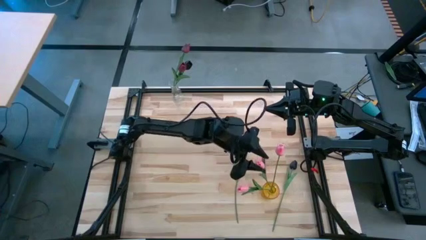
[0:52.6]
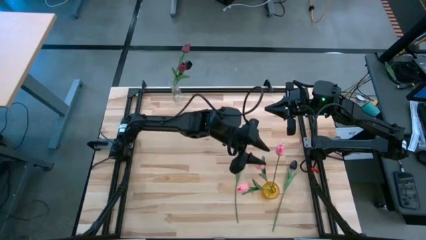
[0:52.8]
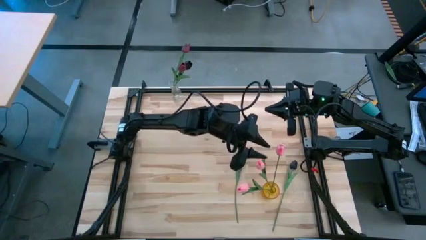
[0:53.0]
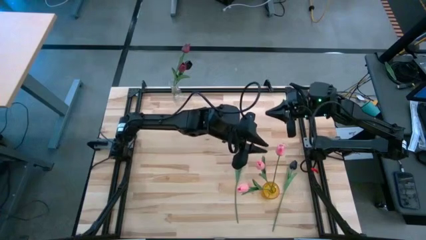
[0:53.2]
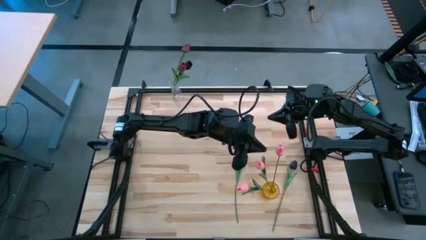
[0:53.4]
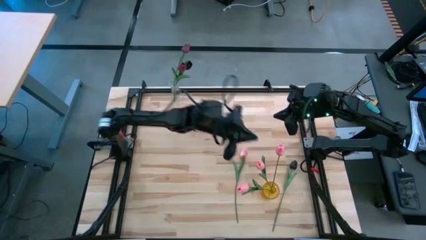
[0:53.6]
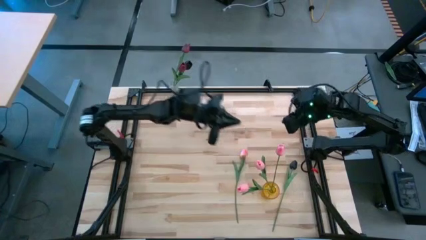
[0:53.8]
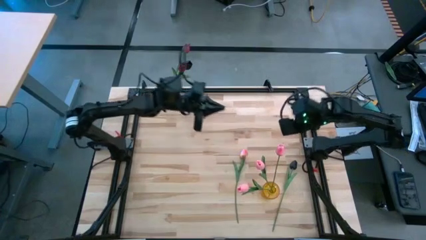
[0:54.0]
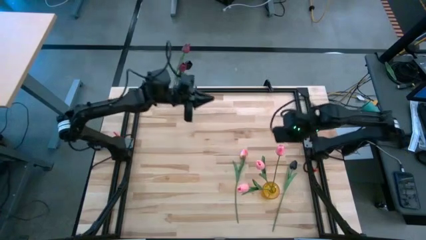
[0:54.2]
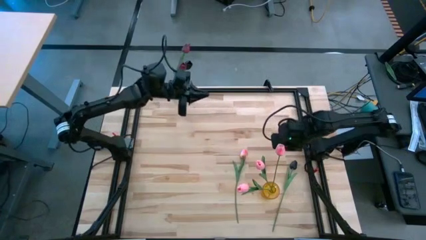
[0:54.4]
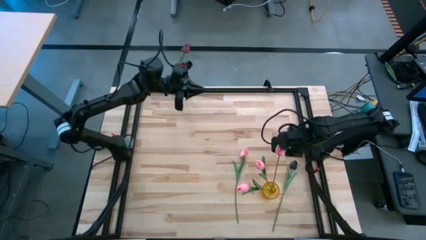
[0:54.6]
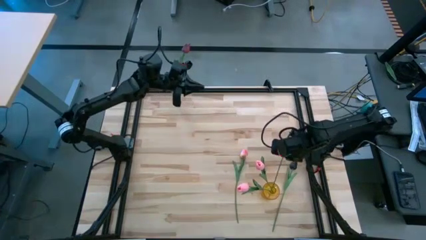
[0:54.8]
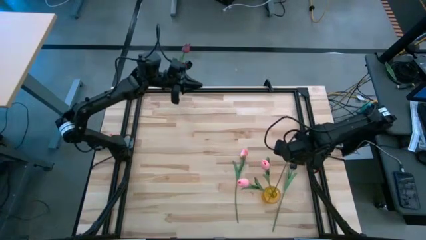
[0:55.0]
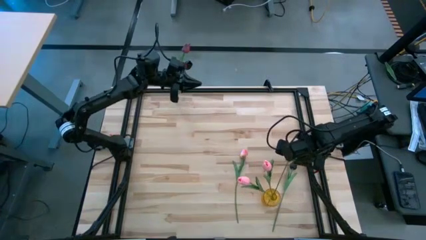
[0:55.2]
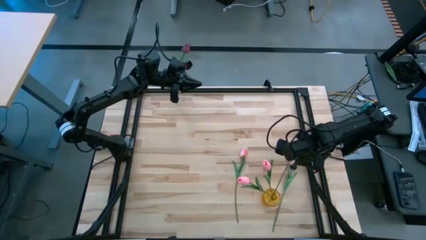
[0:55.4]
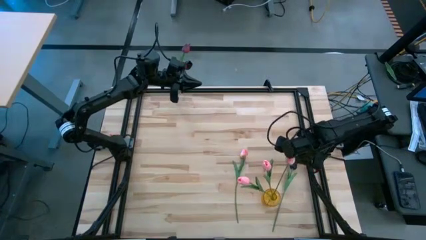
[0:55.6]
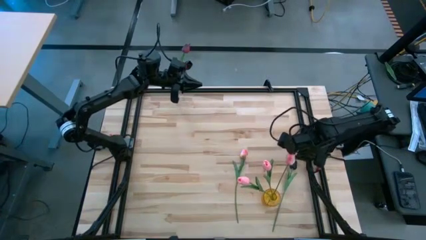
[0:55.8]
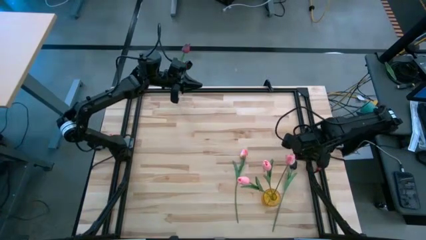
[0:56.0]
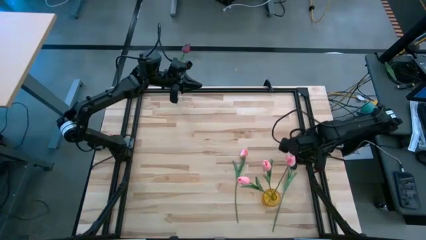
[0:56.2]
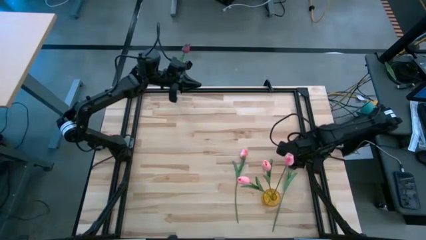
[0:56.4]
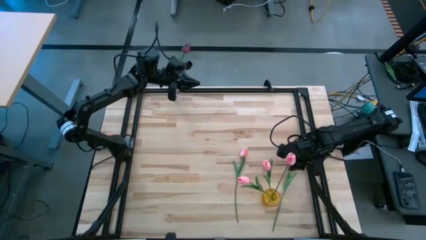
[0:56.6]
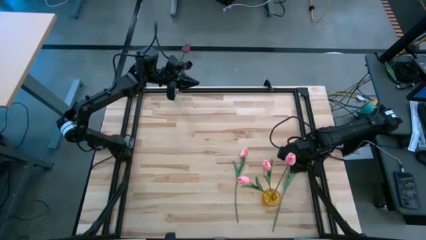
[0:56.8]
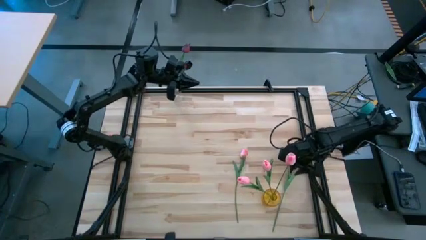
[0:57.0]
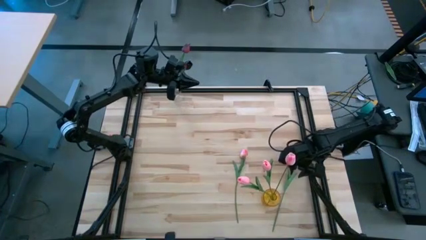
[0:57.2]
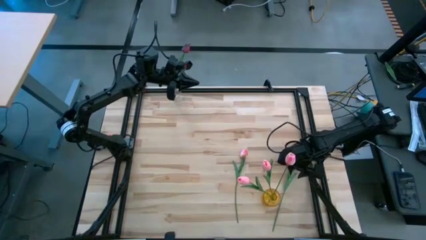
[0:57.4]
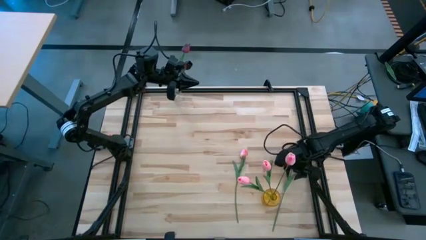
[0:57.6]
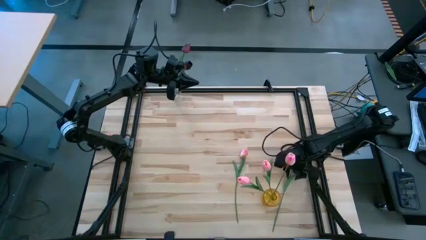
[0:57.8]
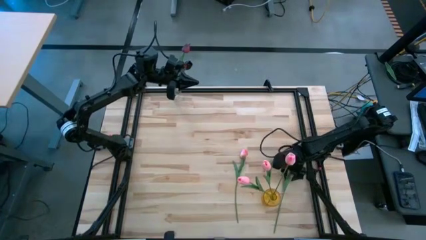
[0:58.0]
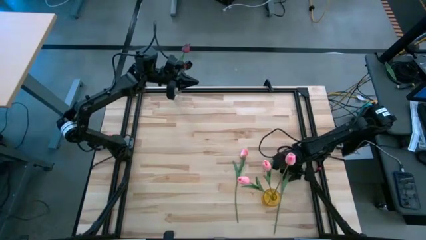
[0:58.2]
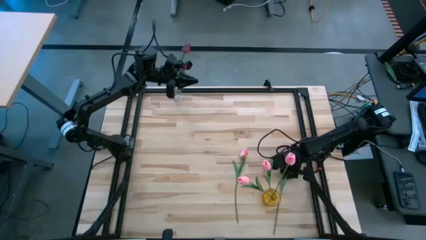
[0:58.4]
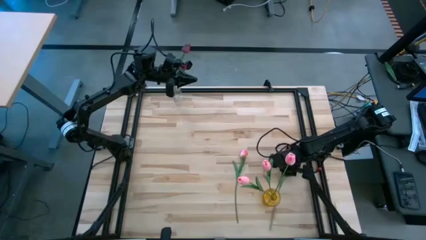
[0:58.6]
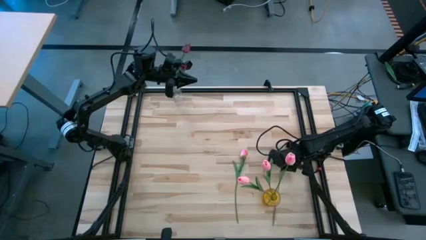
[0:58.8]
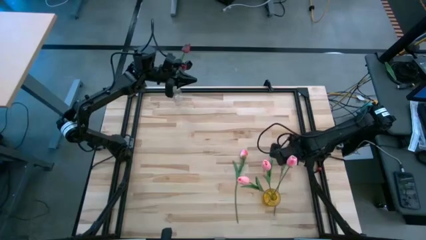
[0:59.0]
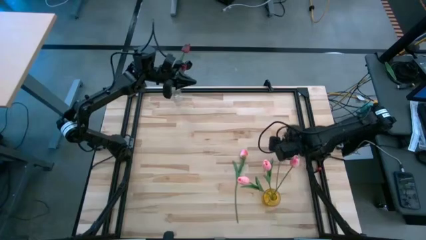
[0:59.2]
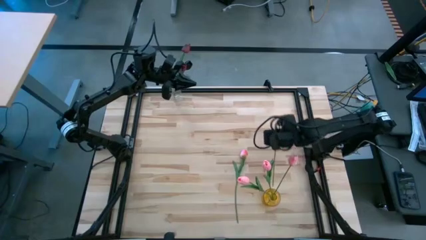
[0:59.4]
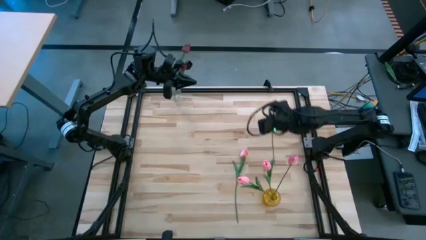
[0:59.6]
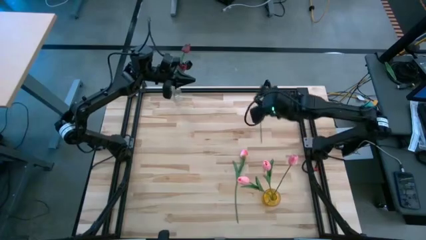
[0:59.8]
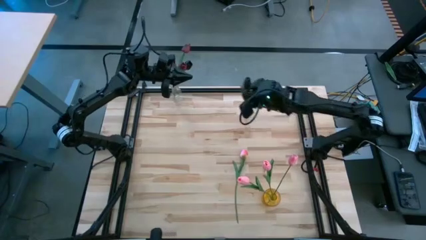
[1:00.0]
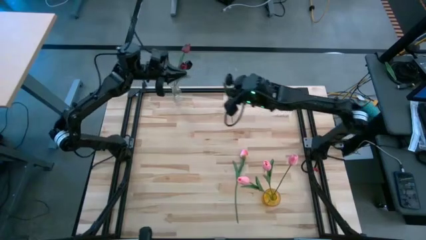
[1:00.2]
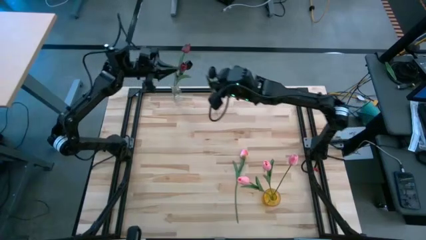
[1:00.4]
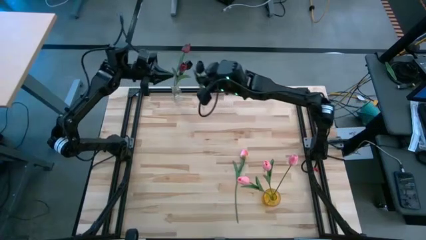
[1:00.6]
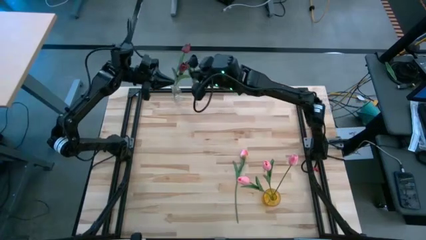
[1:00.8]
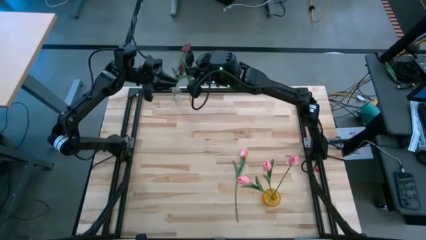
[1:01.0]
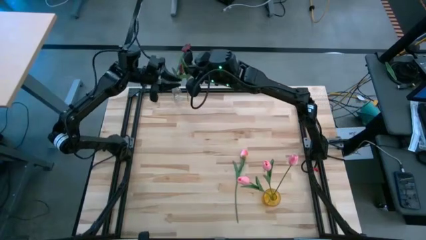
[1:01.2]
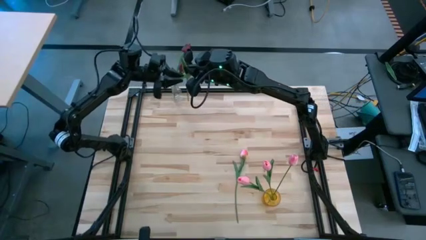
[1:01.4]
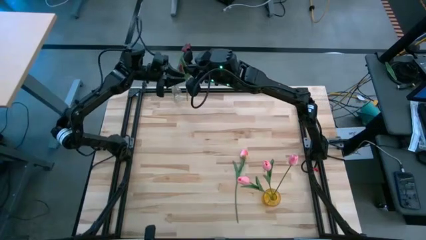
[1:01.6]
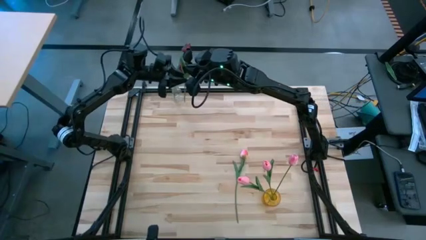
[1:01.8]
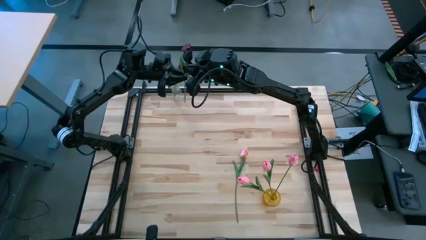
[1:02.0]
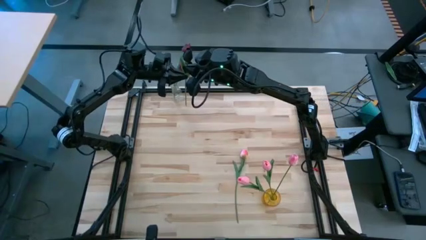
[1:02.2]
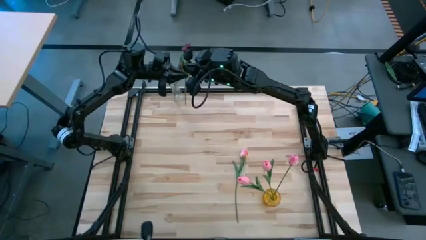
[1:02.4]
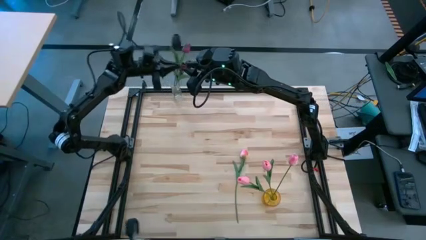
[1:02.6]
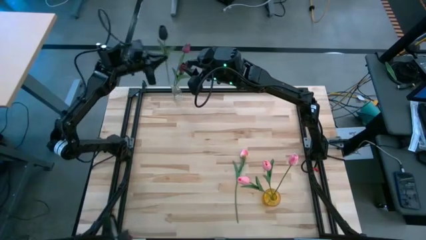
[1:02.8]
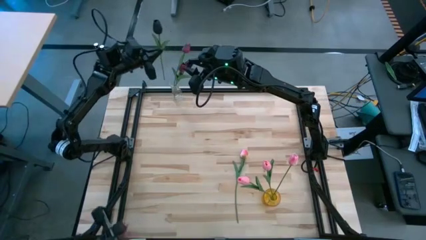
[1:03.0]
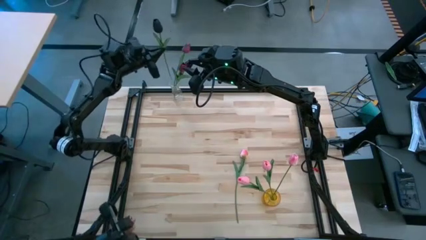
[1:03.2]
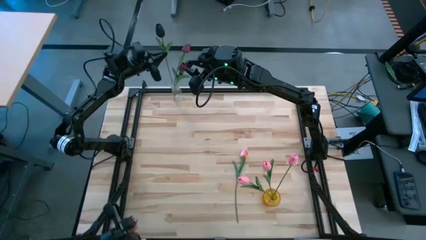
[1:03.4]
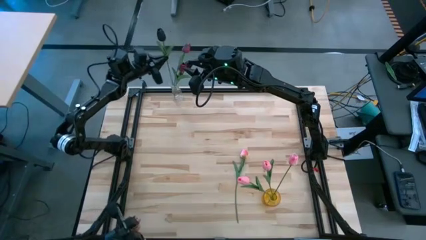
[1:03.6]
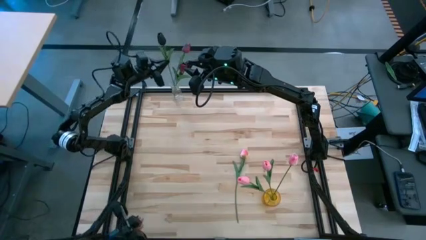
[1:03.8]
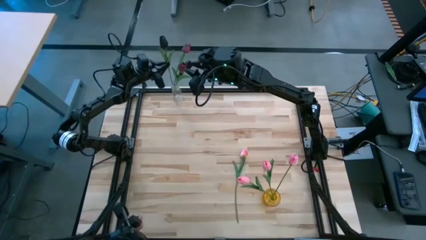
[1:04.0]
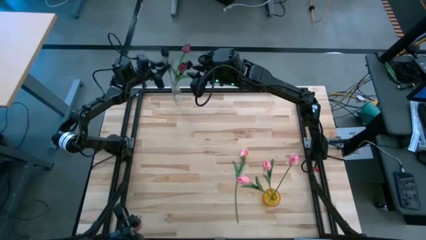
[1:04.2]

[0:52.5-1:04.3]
Task: Sort flowers into vase by color
Put the black flower into the transparent flower vase

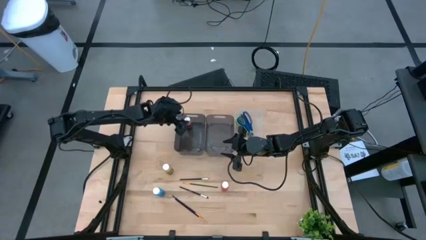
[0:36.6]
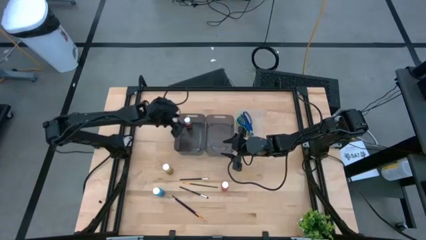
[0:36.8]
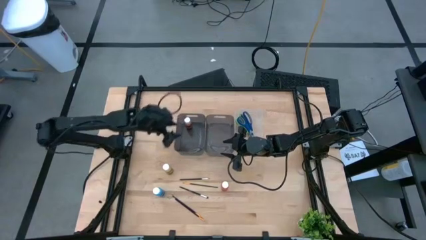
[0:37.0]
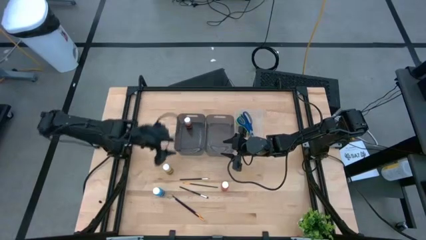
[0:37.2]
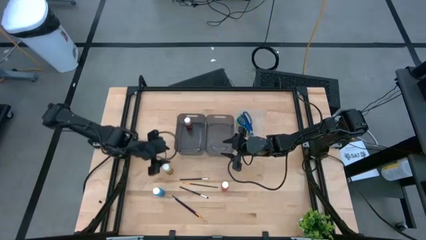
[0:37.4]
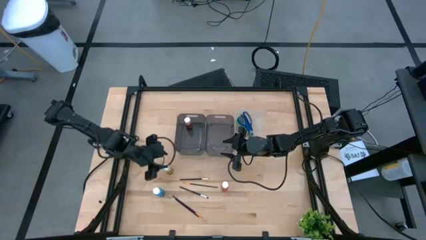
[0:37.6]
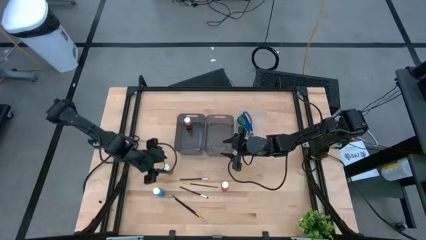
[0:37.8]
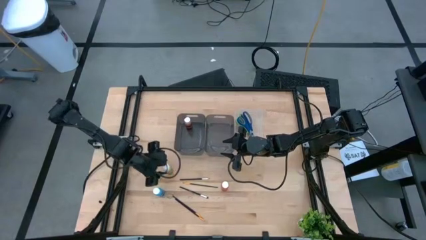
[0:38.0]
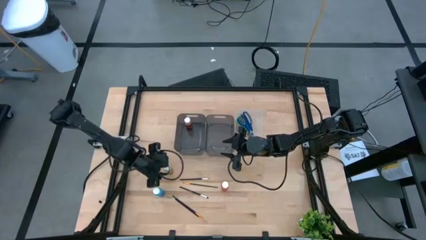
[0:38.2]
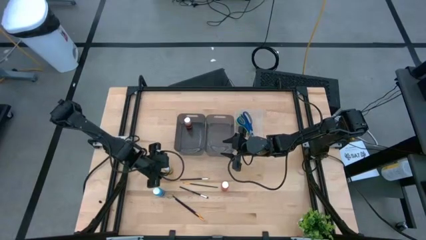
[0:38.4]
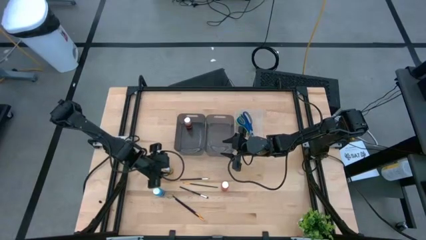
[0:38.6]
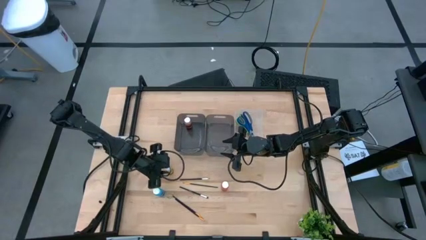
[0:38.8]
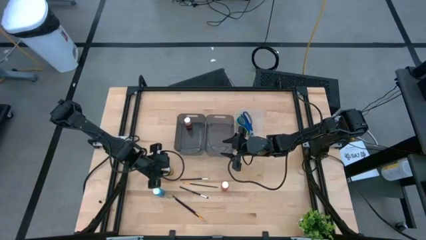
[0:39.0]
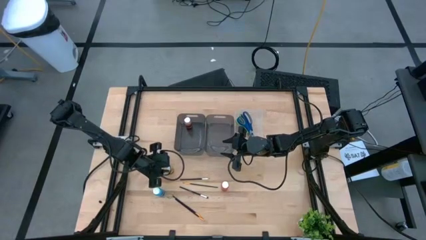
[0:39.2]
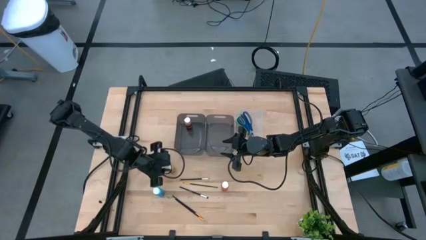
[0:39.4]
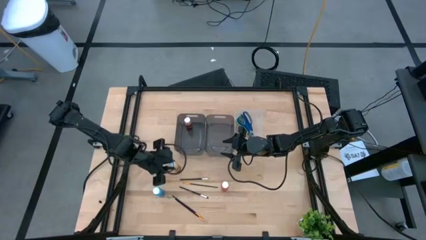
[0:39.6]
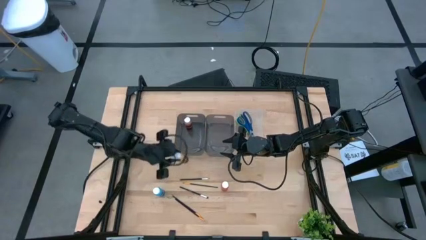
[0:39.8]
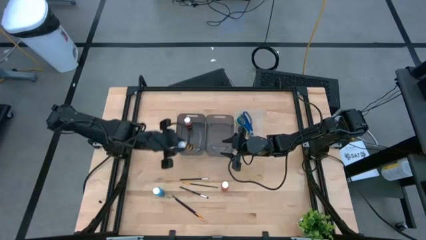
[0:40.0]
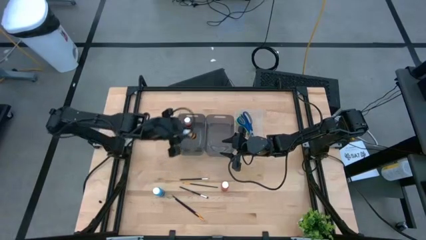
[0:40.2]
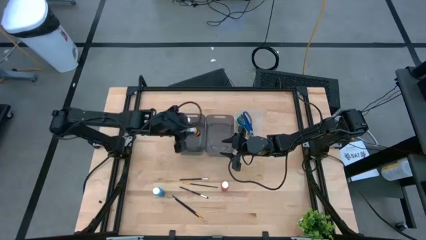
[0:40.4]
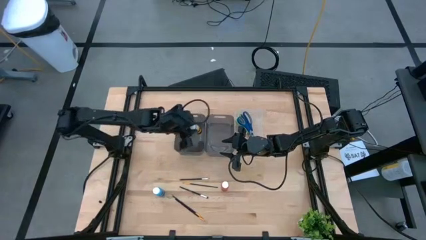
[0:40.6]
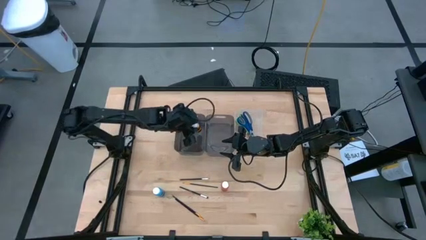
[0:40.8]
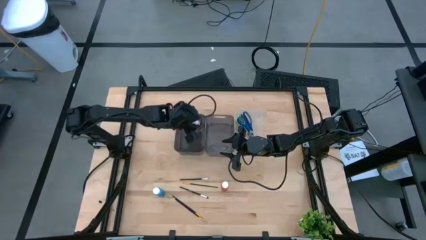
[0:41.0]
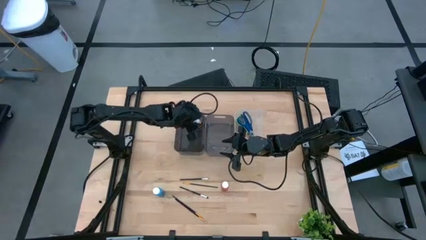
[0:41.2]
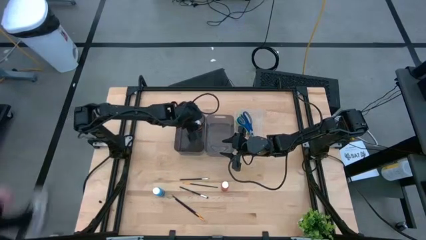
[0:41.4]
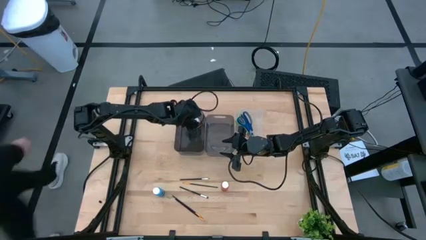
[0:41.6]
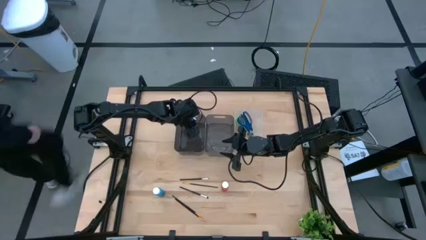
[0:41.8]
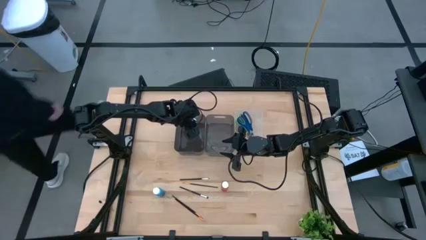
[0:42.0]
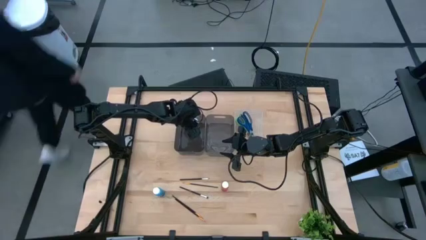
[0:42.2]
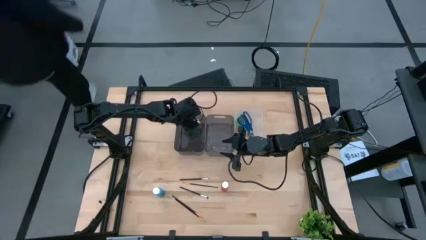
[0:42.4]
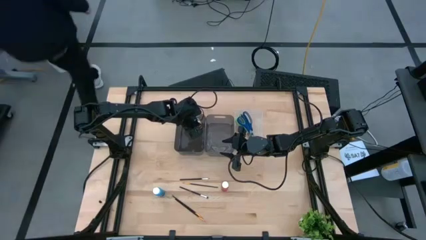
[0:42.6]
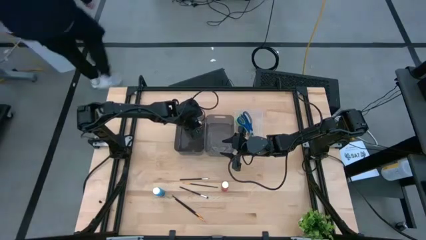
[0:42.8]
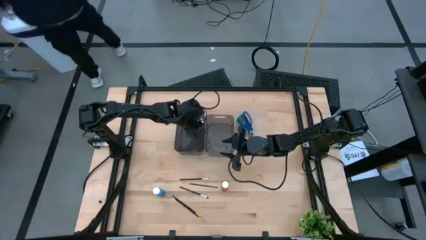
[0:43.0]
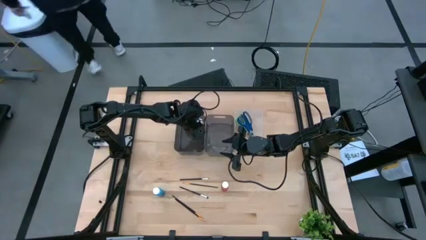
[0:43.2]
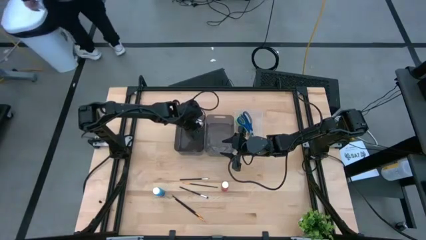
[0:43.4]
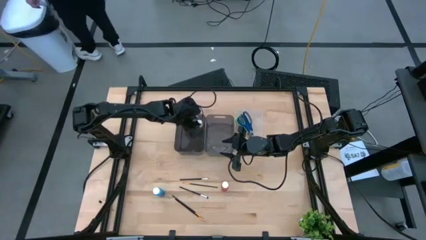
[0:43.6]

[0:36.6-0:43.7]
Task: Pick & Place Paint Supplies
Put the yellow paint bottle into the left black bin
